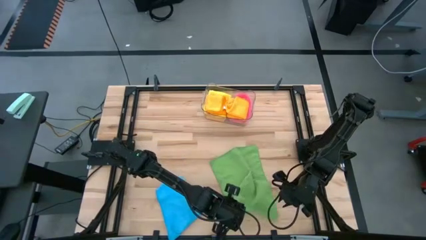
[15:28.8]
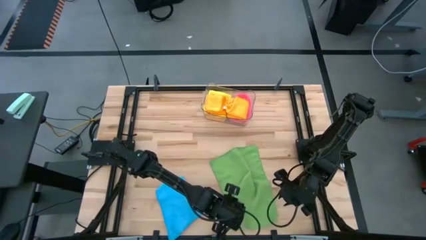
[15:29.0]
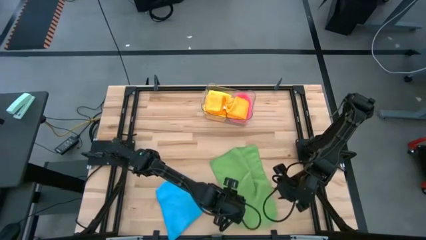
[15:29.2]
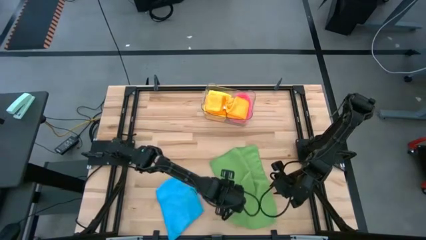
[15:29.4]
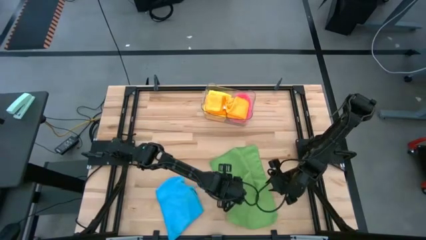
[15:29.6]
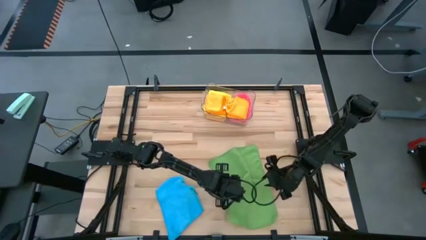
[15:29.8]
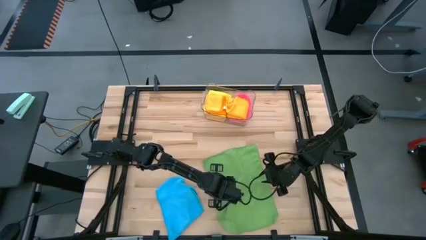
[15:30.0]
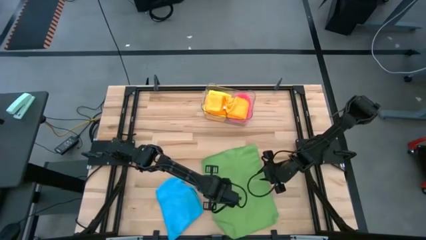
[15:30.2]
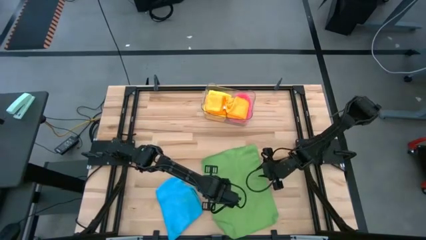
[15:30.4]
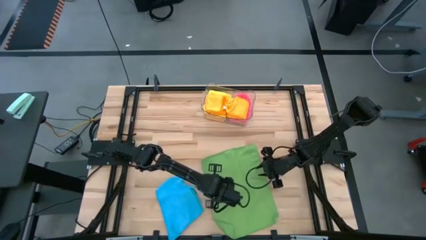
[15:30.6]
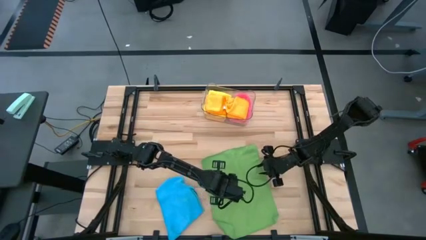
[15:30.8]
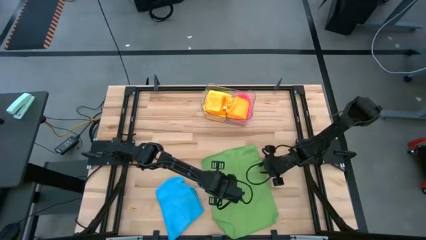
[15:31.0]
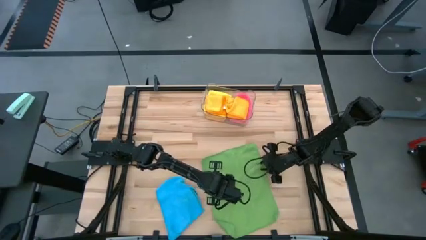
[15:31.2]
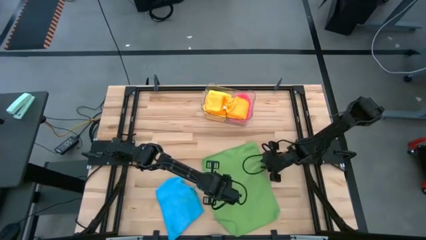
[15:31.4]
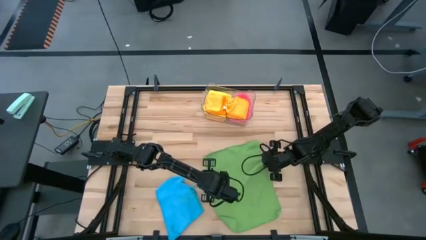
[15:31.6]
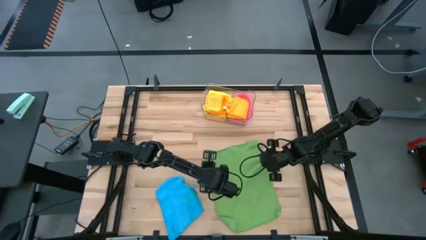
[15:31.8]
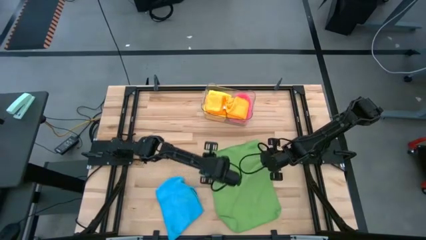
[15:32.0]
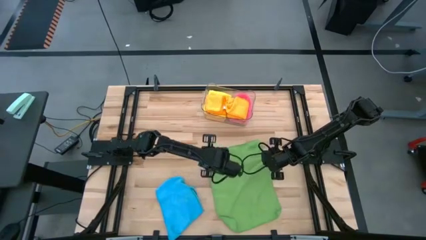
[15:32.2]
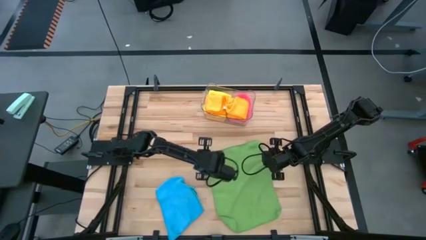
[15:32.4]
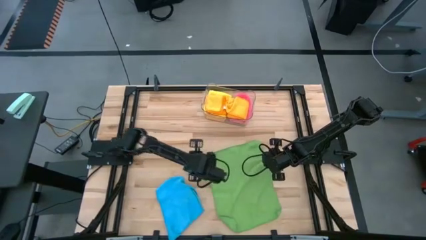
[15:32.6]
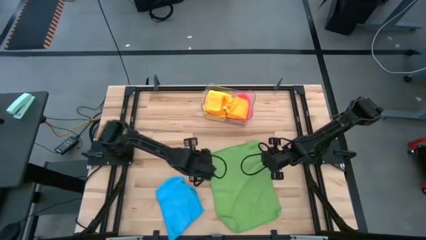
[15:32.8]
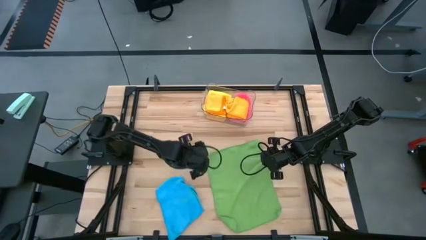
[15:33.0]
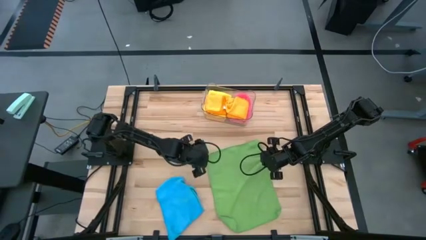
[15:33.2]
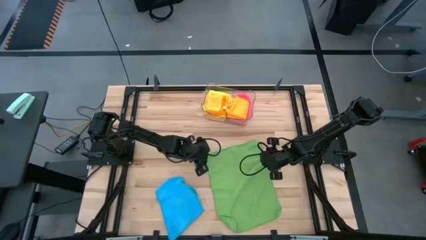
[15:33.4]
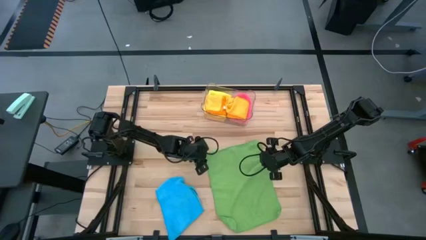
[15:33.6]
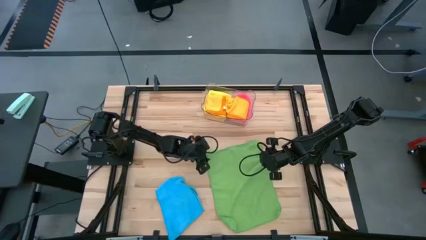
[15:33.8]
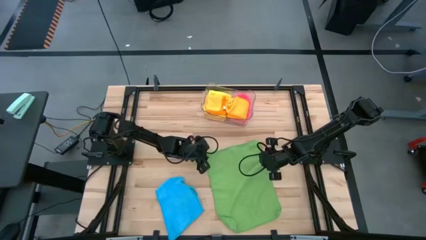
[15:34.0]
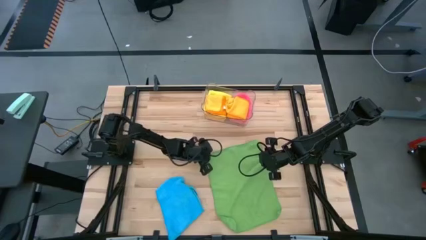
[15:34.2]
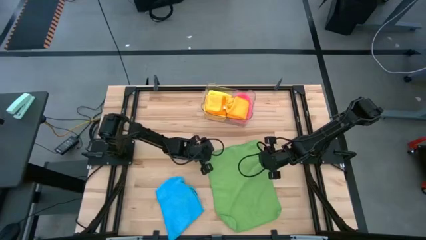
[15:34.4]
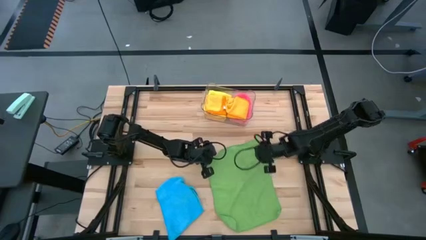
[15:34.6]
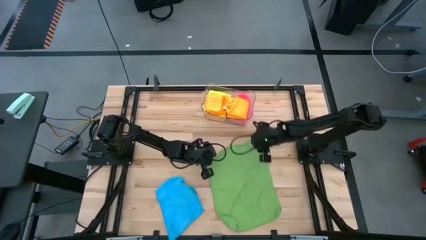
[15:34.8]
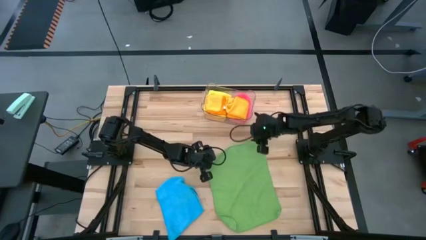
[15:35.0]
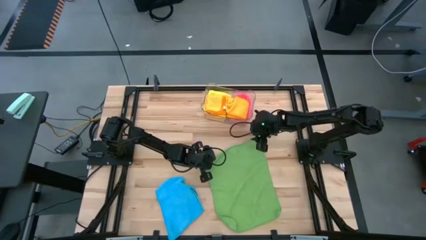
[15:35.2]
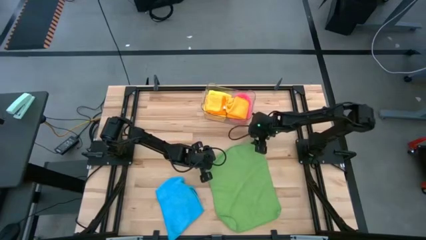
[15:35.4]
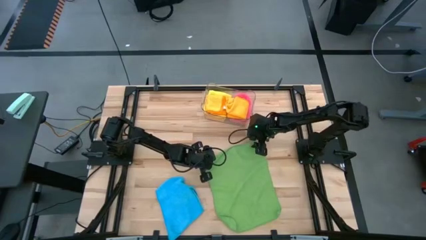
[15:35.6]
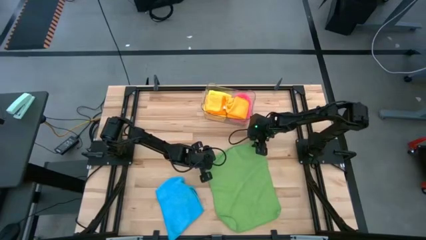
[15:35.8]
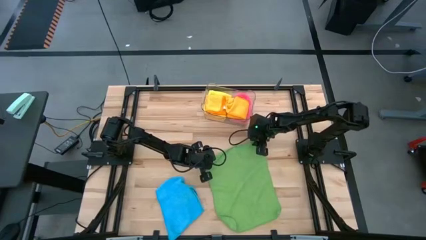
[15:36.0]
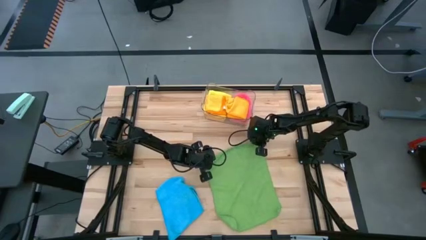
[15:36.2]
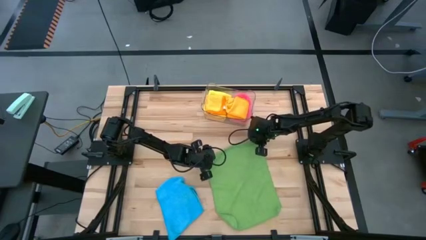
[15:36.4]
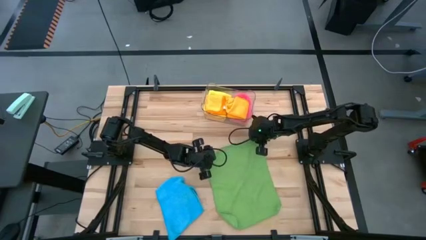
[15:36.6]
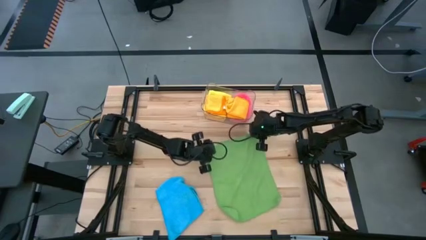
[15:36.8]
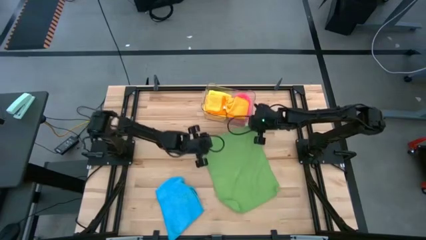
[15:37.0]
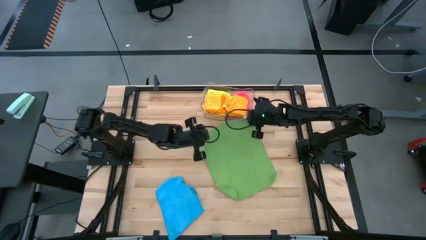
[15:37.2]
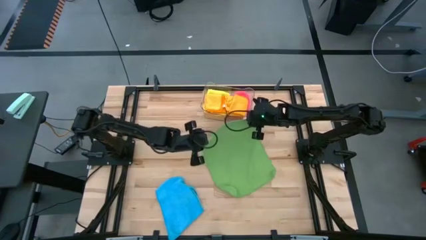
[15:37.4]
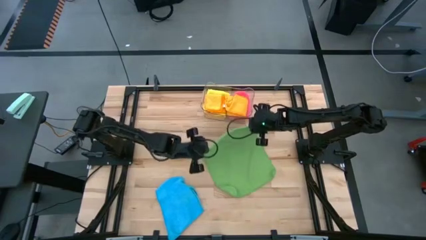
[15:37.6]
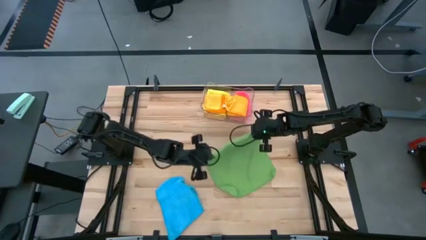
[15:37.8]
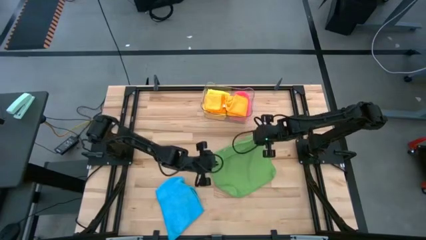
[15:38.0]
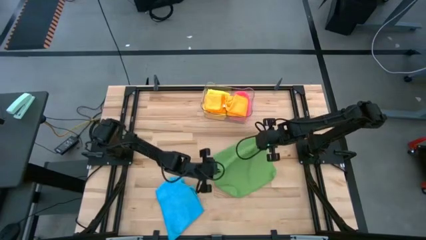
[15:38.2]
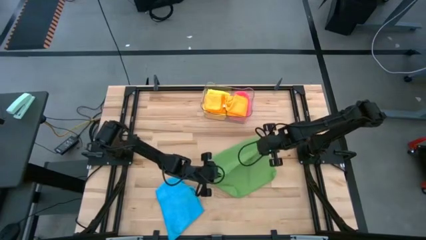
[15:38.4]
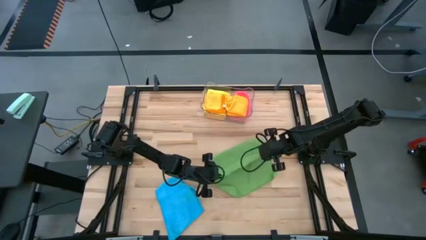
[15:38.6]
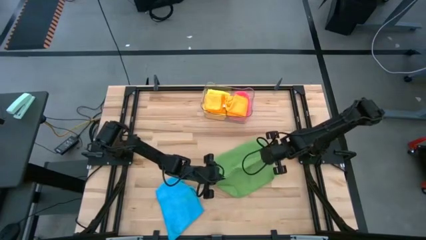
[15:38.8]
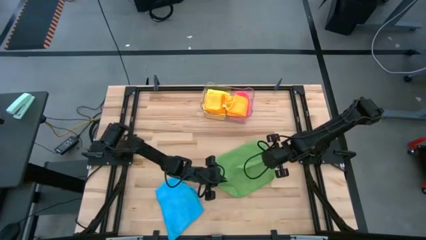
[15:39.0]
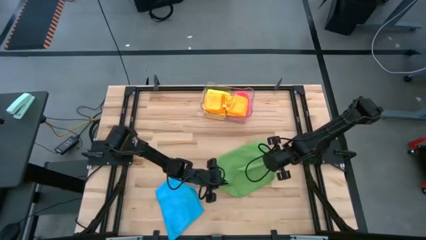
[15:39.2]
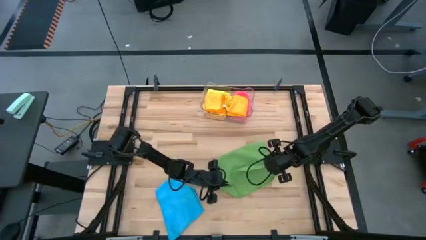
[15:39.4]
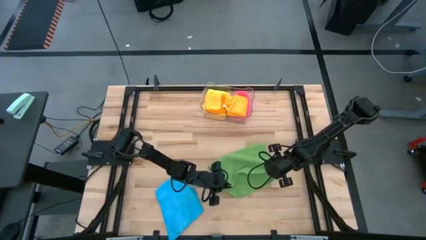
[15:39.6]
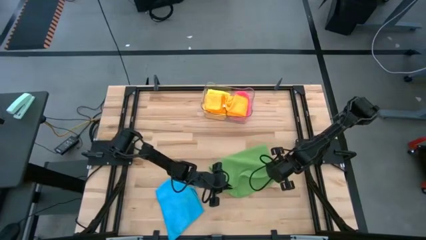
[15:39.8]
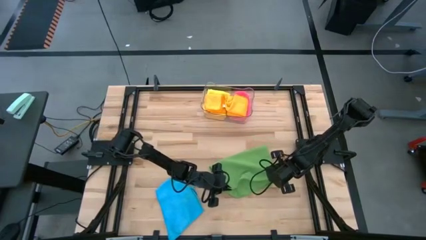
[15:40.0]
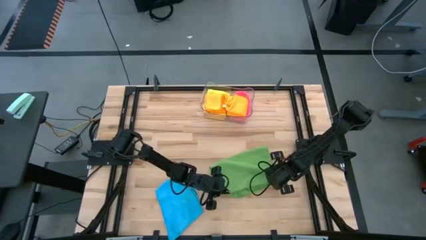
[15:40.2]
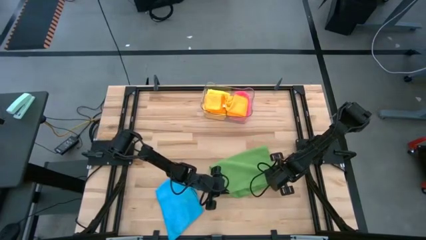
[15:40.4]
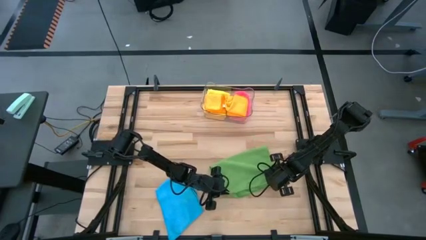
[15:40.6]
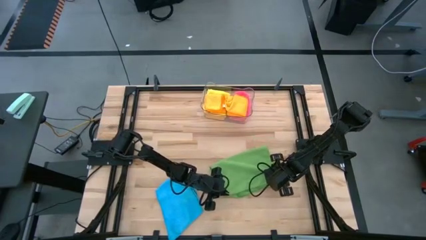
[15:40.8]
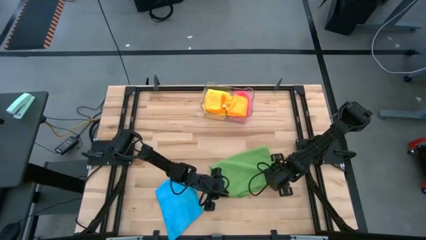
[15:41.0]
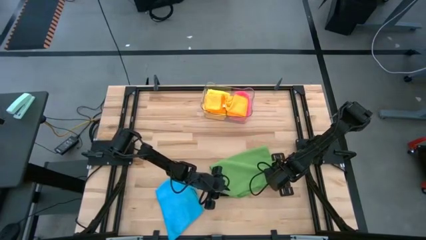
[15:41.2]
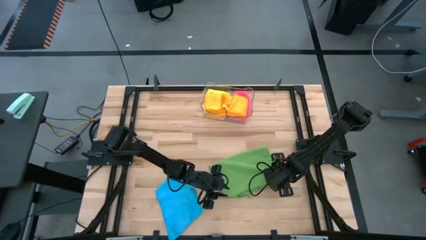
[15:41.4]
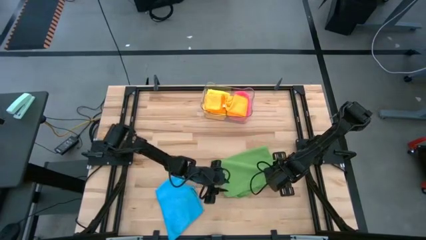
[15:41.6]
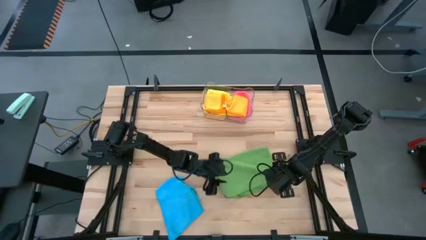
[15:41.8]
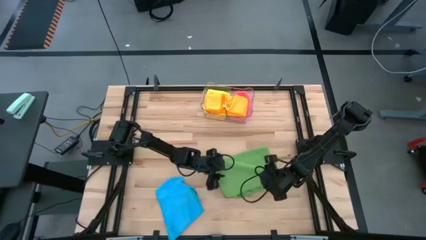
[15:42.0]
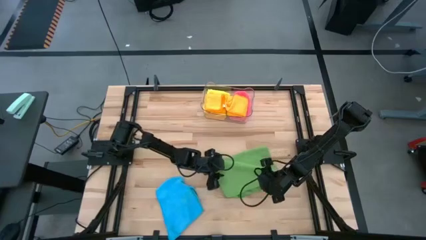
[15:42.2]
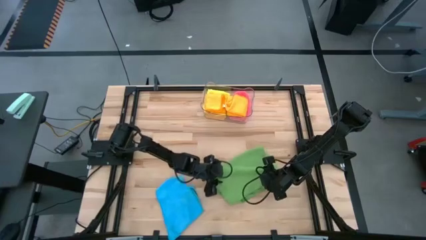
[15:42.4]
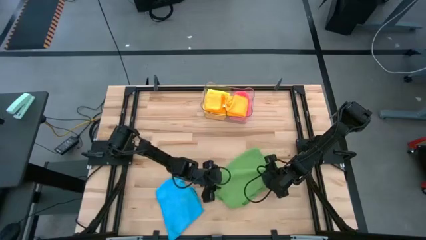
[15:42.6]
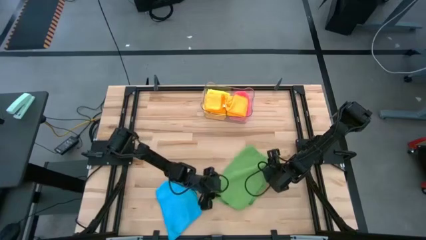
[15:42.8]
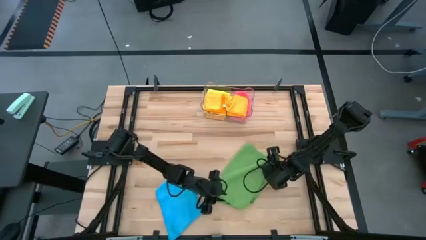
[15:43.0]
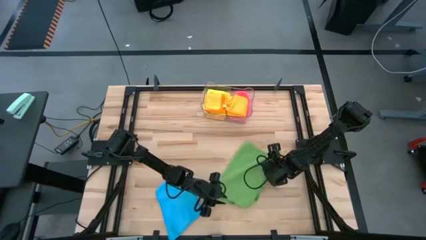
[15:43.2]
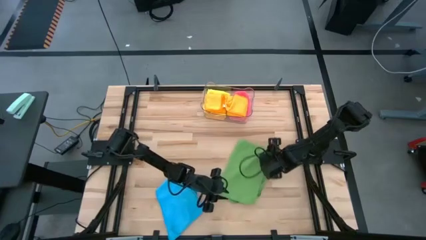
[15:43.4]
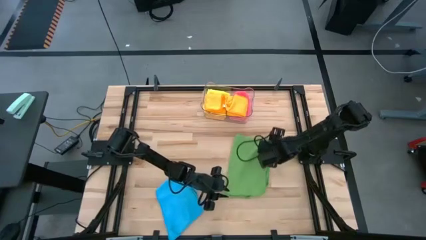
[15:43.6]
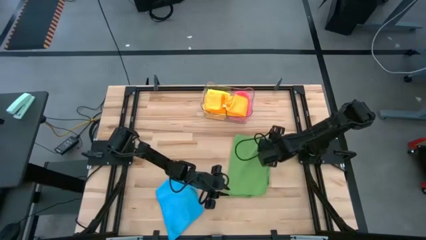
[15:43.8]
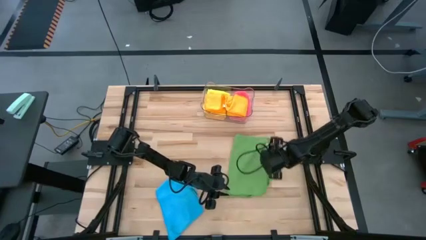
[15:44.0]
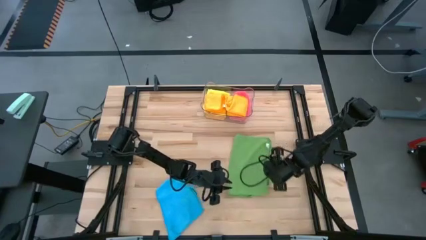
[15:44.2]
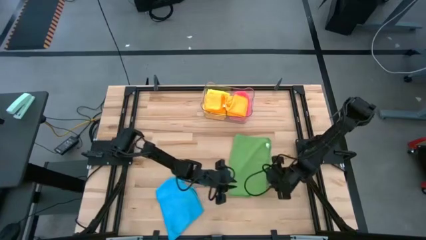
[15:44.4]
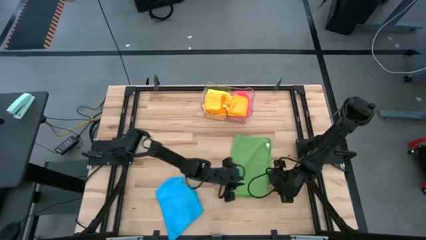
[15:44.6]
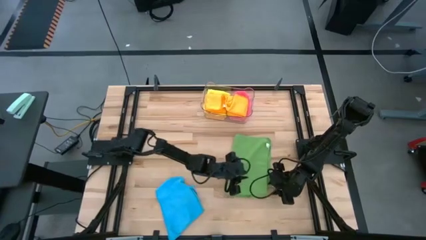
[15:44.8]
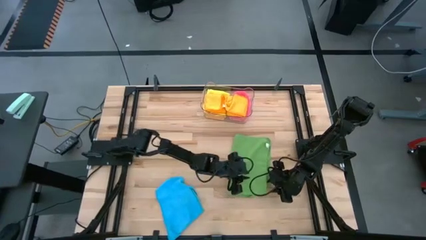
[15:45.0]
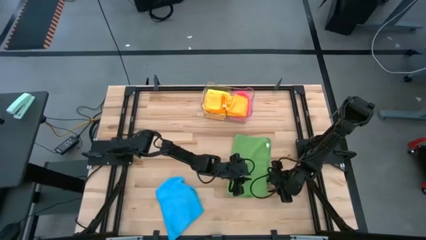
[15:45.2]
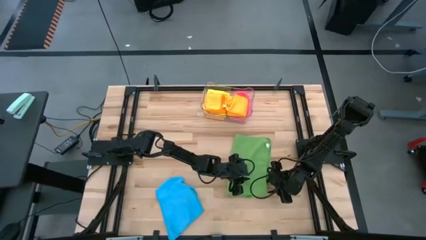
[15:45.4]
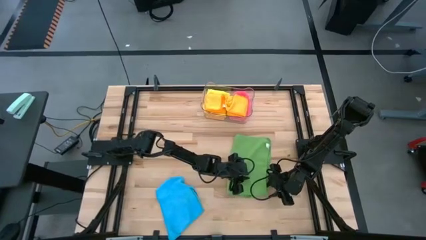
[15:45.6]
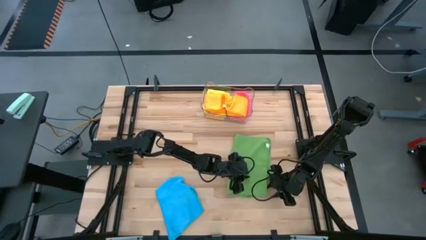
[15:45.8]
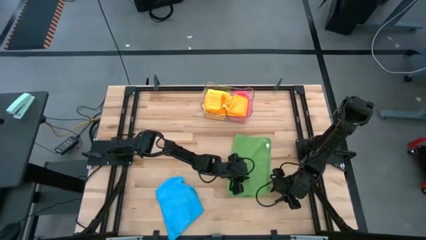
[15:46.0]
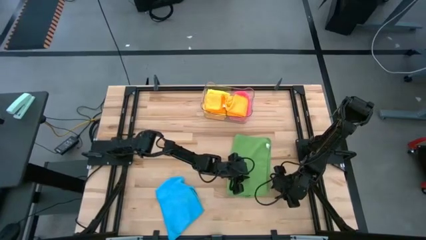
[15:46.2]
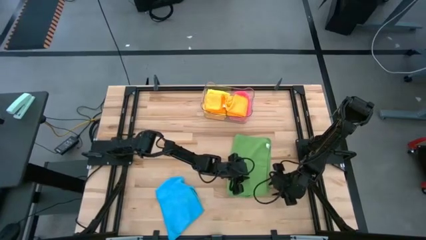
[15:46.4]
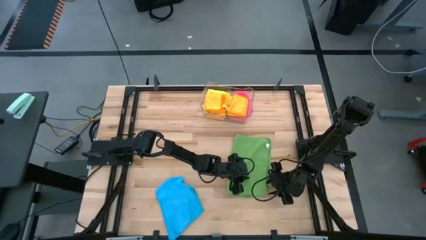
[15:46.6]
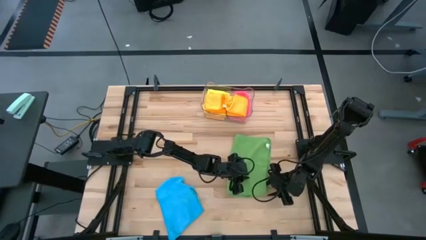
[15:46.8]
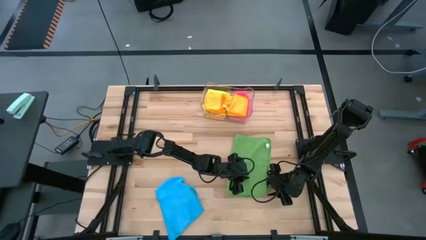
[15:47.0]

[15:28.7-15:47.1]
Task: Fold microfiber towels
Fold the green microfiber cloth
